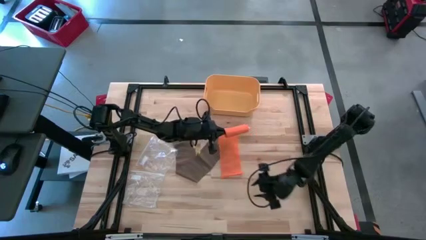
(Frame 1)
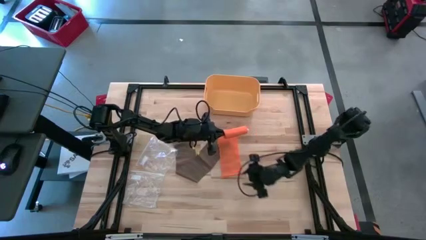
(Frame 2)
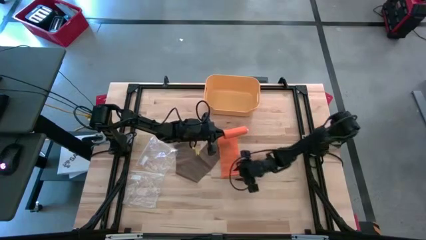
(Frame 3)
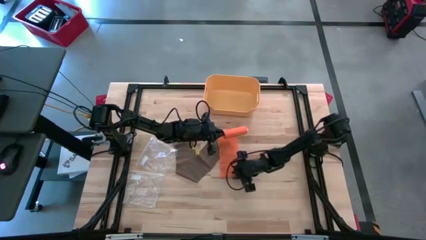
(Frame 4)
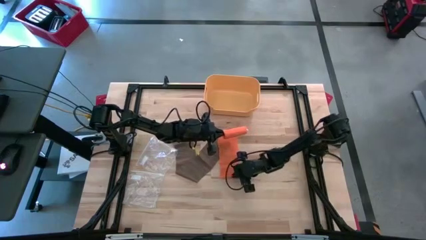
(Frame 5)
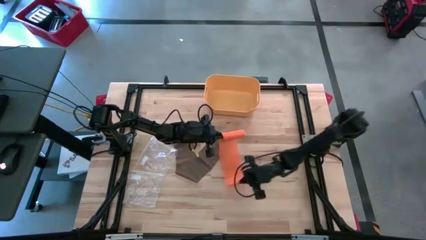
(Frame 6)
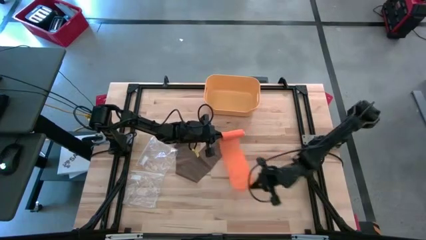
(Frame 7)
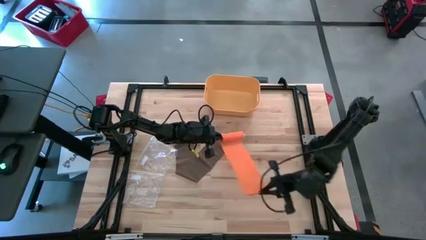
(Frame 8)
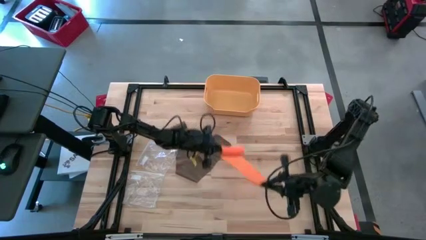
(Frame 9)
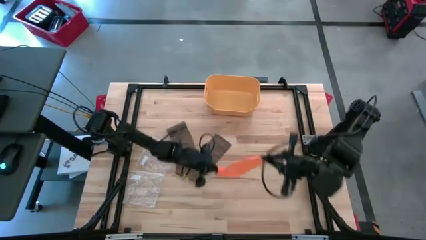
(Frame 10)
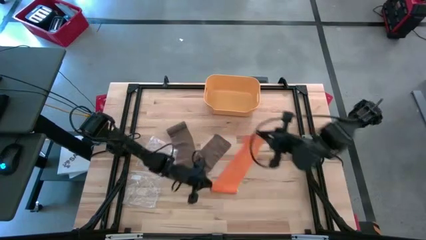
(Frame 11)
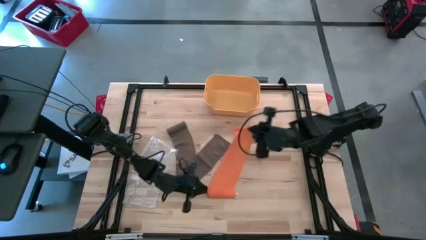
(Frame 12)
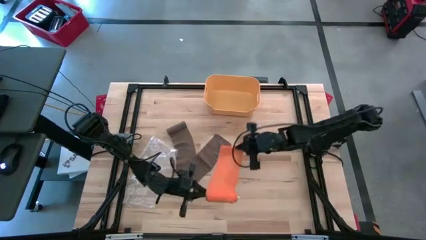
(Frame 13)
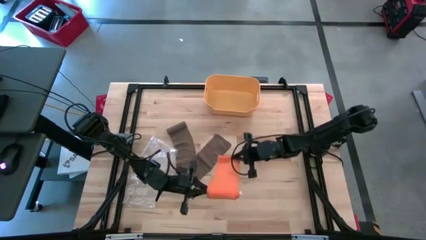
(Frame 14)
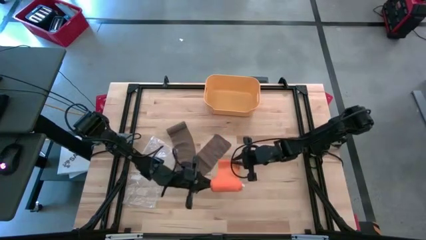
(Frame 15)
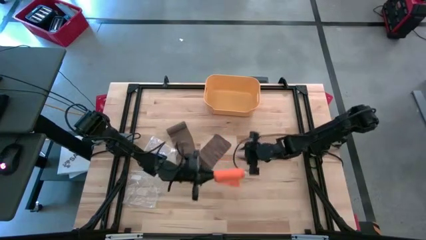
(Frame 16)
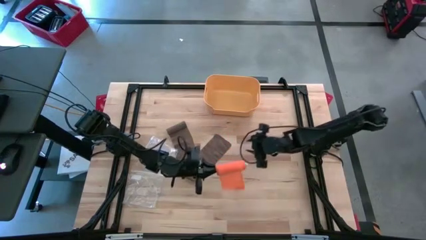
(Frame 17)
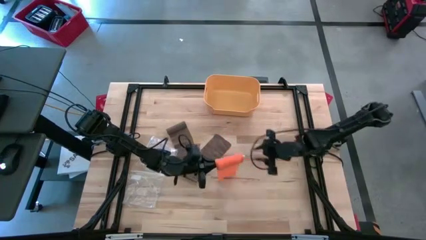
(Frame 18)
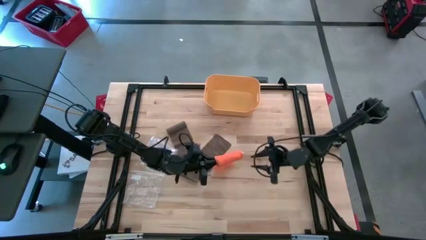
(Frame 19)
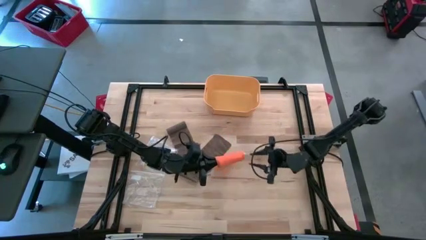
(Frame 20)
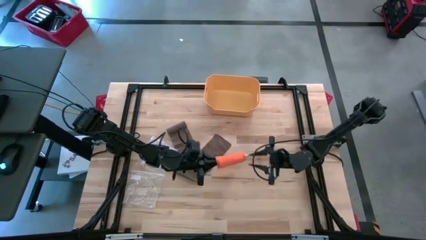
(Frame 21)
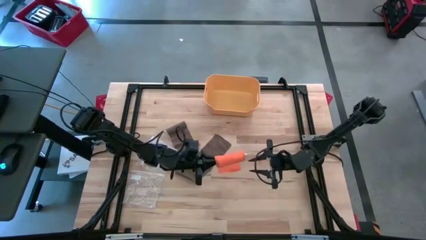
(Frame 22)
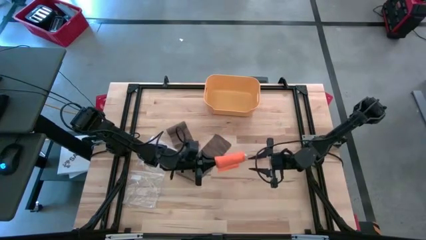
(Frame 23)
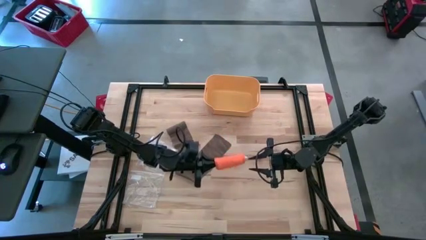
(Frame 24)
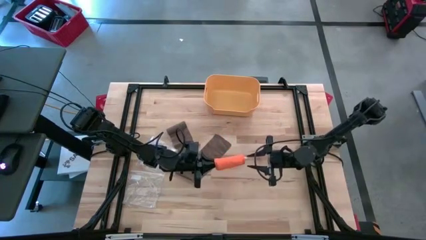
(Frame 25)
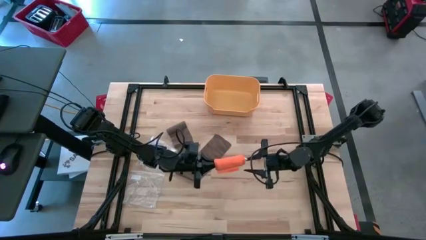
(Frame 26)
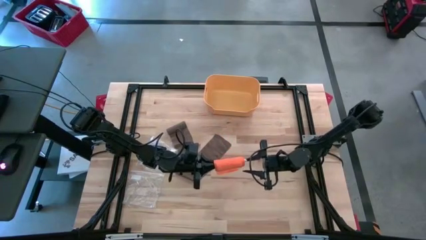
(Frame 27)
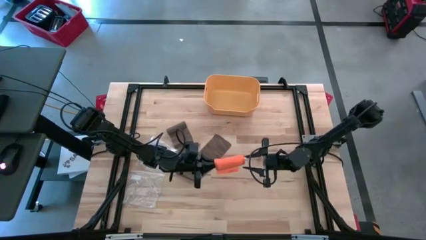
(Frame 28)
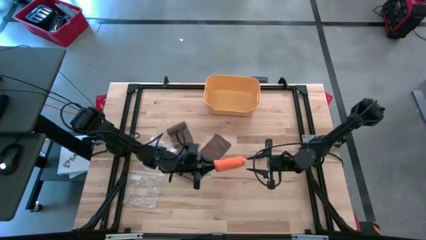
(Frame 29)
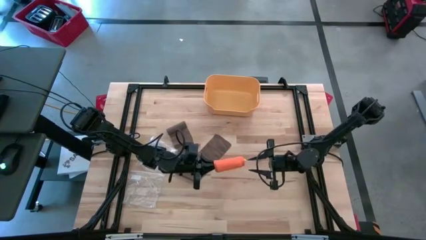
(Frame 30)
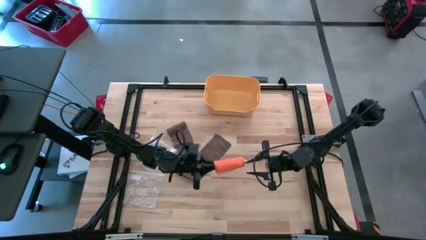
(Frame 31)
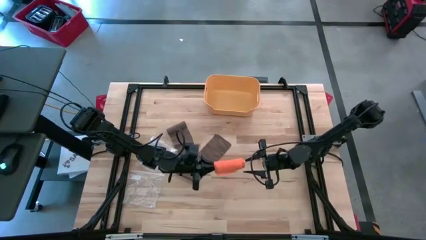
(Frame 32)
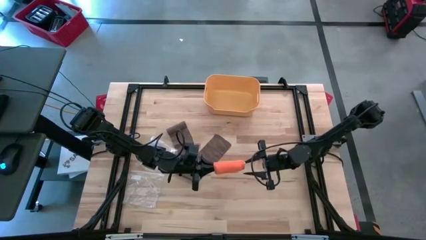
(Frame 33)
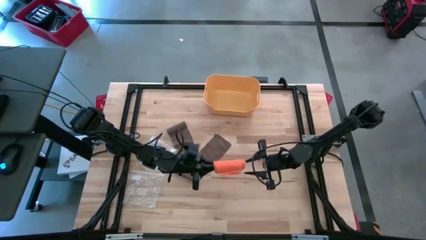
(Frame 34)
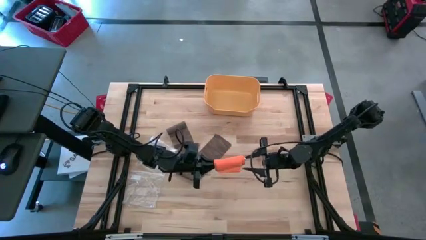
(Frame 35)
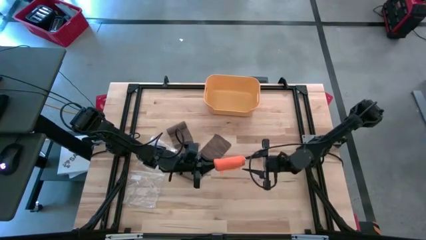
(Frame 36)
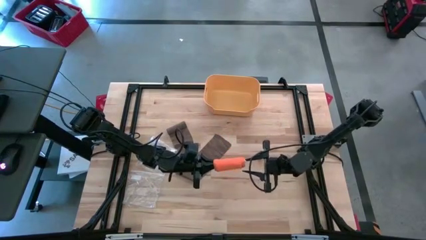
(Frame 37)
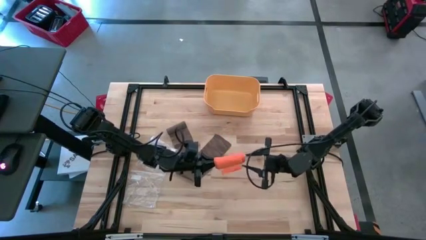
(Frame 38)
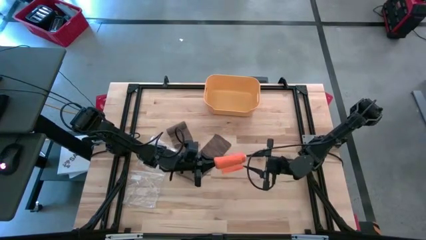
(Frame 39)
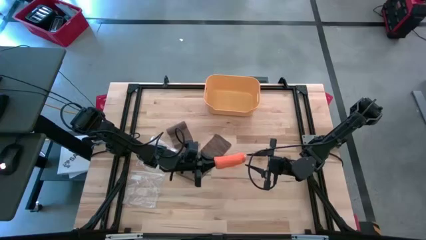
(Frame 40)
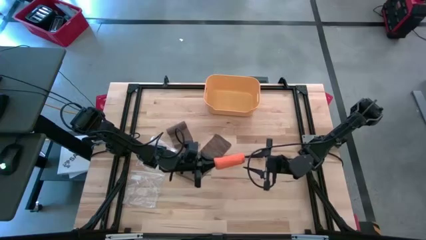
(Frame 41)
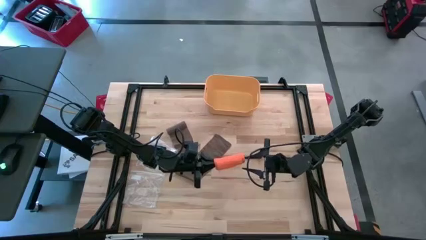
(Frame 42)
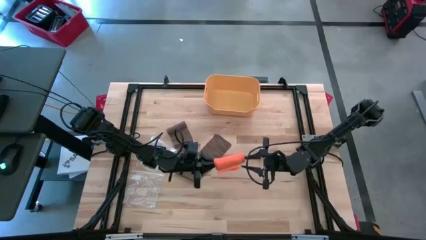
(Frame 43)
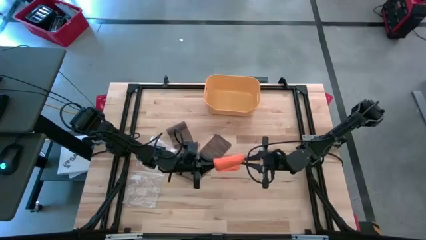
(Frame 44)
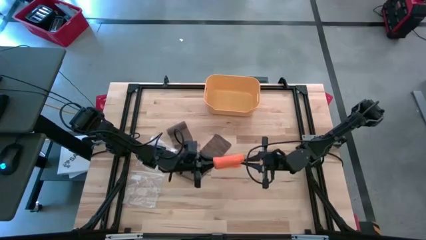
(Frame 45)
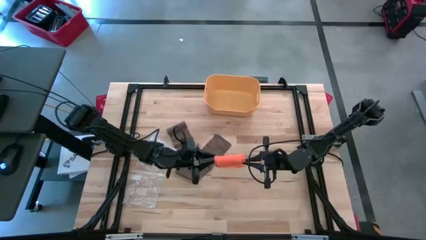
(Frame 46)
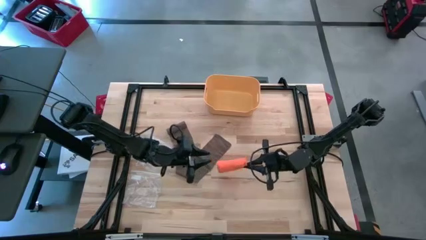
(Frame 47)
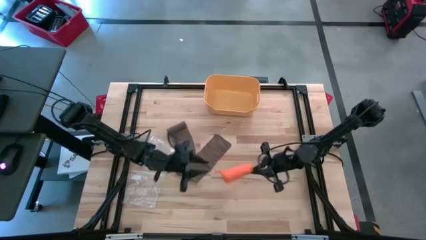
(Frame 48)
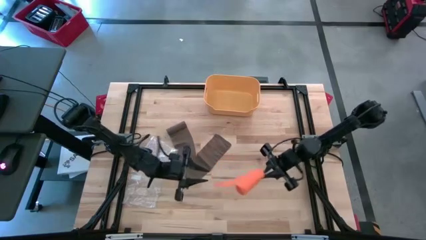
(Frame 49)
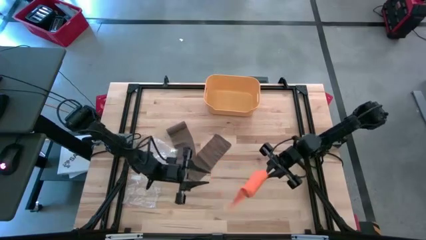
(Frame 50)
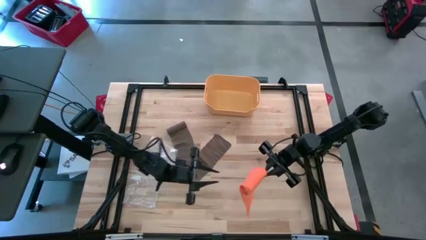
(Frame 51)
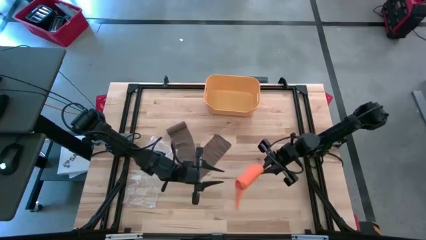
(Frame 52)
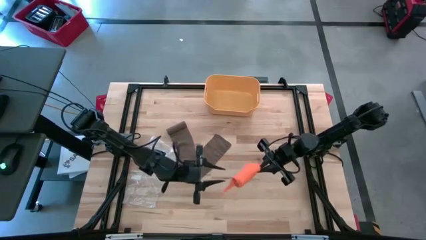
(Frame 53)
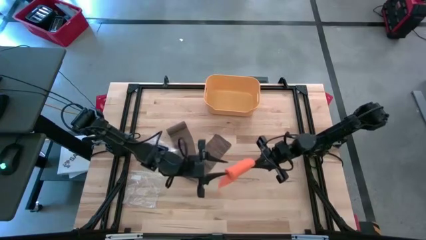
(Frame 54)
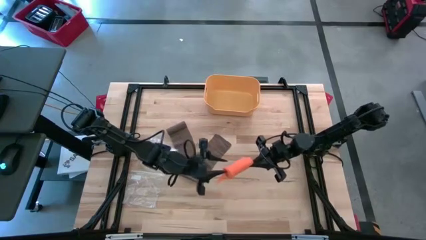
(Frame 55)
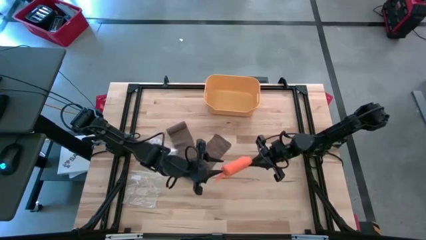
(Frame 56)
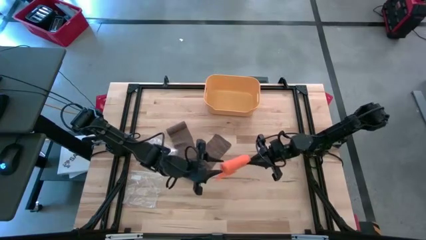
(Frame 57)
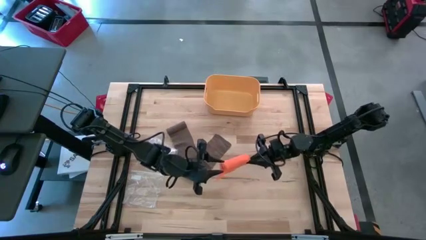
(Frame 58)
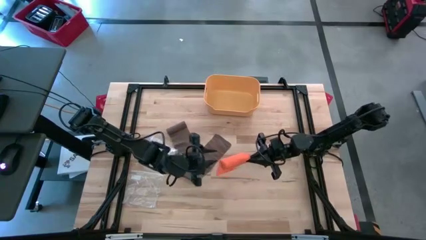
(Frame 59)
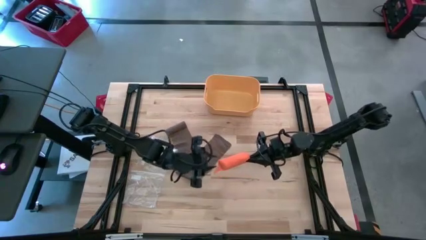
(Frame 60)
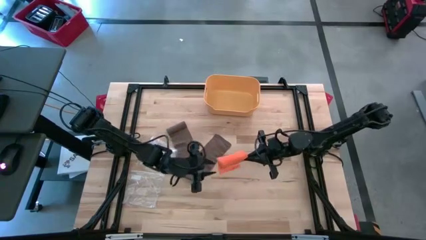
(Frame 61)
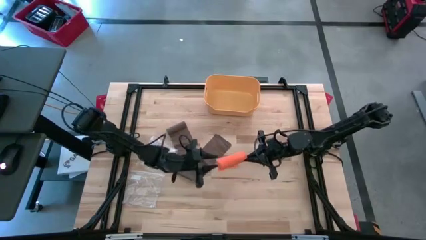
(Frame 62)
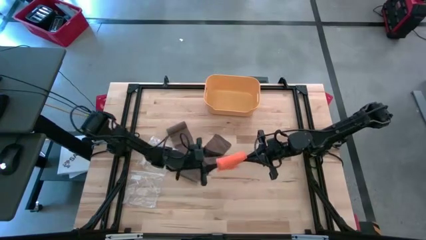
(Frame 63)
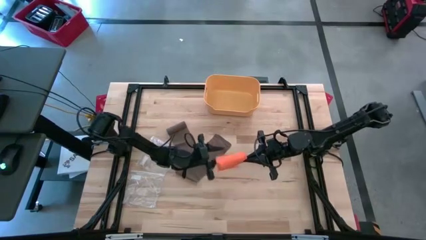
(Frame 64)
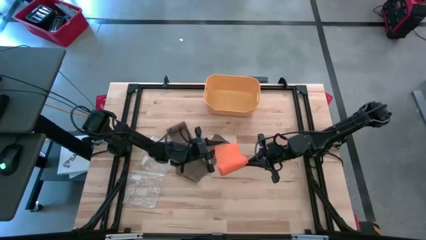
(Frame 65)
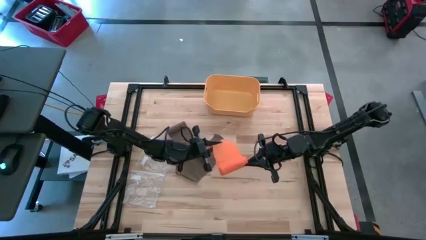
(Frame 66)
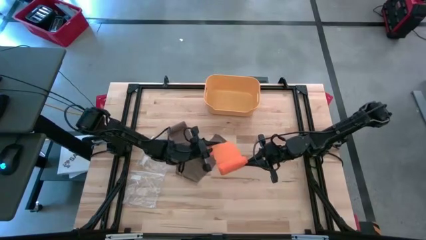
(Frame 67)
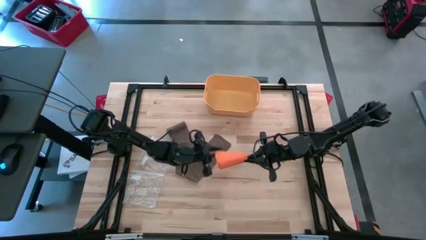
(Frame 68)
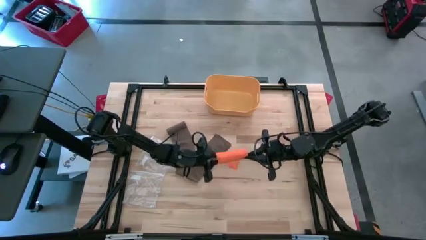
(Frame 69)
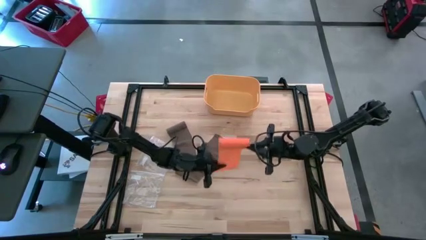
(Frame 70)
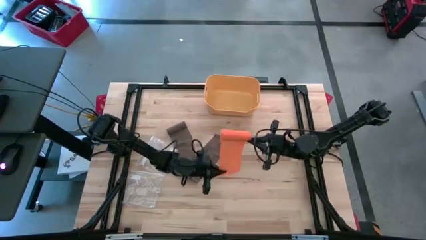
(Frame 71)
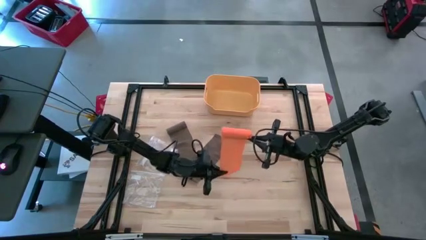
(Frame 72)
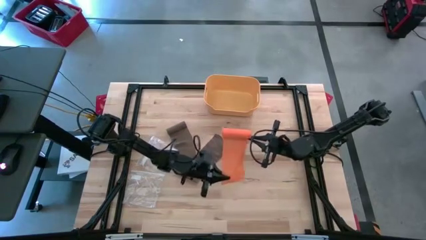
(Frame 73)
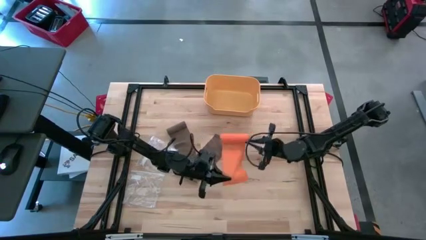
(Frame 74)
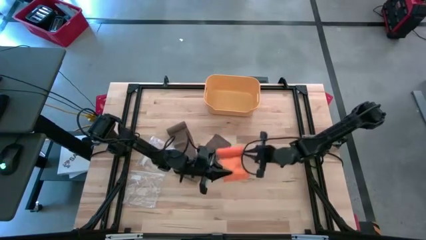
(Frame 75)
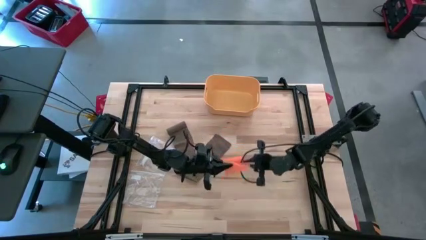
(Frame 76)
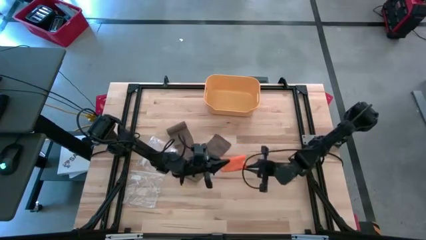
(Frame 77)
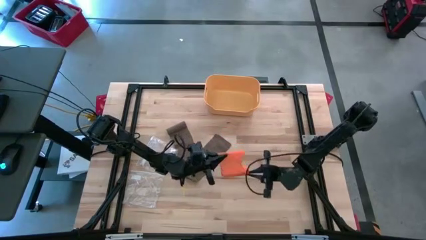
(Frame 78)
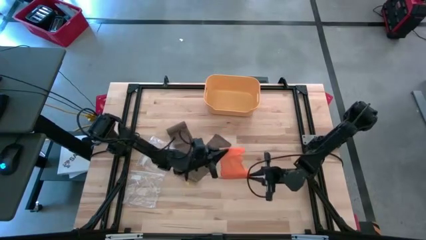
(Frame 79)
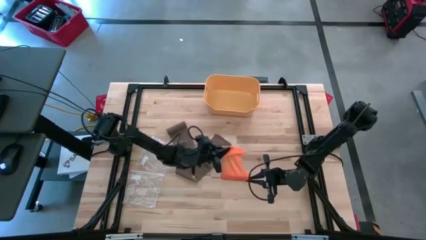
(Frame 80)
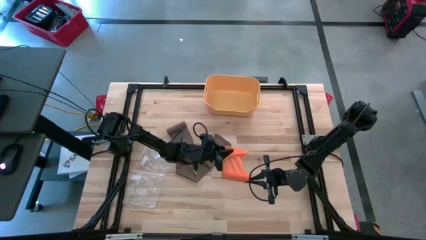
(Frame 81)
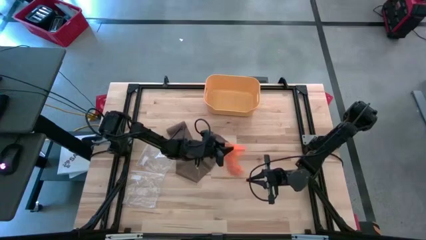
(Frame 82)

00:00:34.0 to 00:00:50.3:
Task: Roll bandage
Roll the orange bandage
